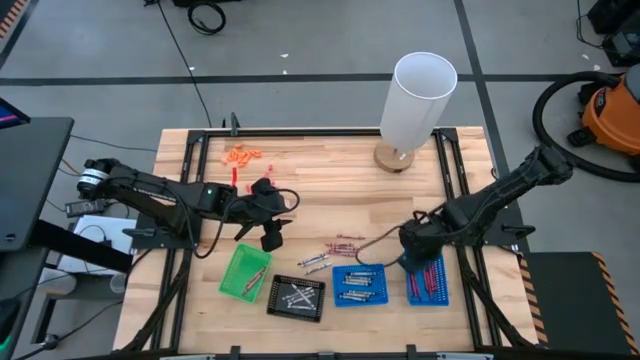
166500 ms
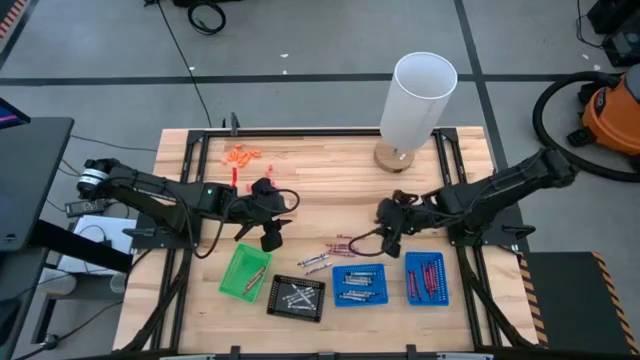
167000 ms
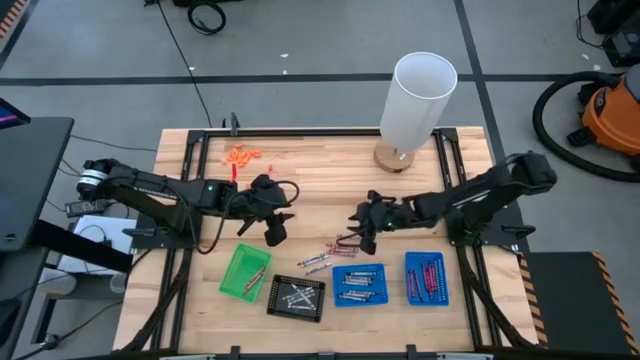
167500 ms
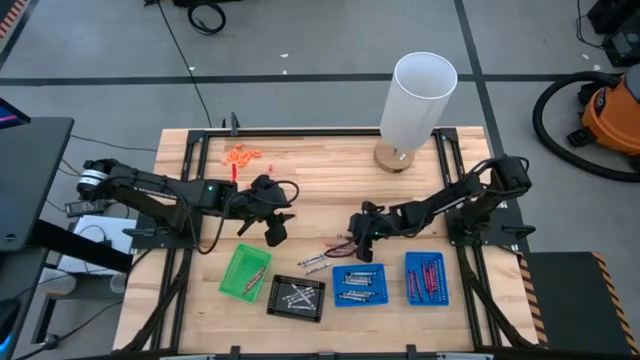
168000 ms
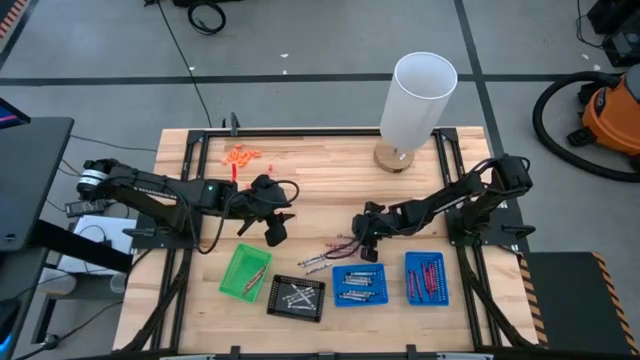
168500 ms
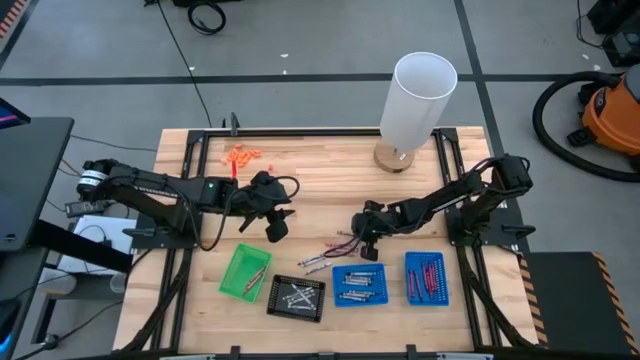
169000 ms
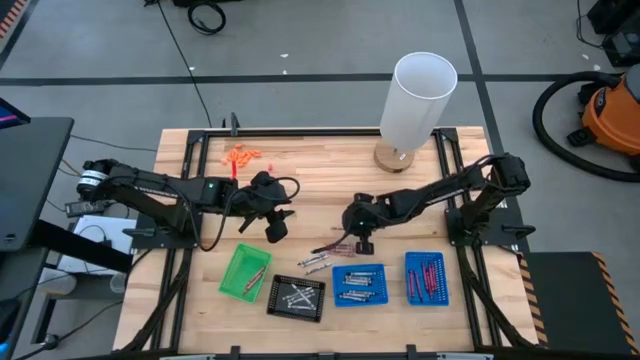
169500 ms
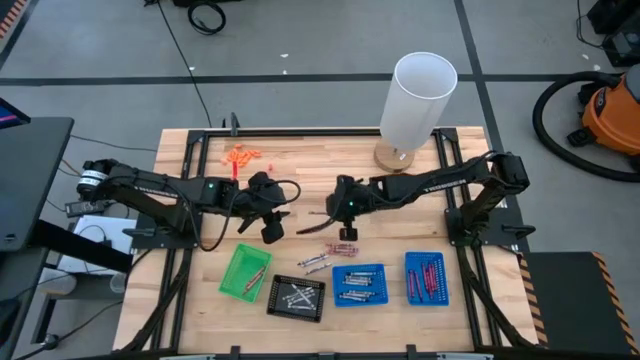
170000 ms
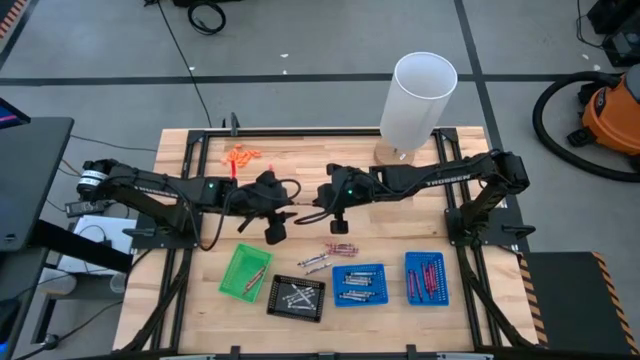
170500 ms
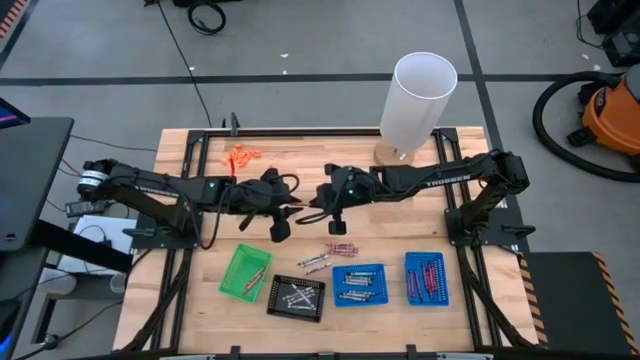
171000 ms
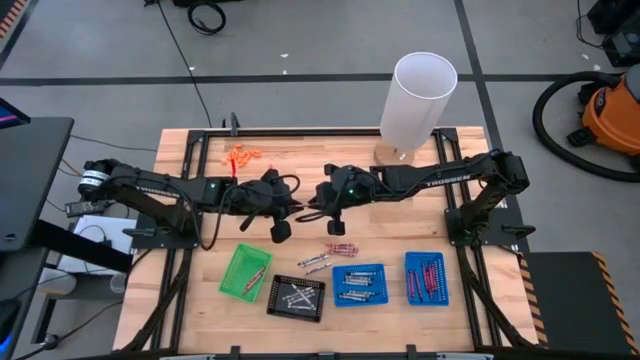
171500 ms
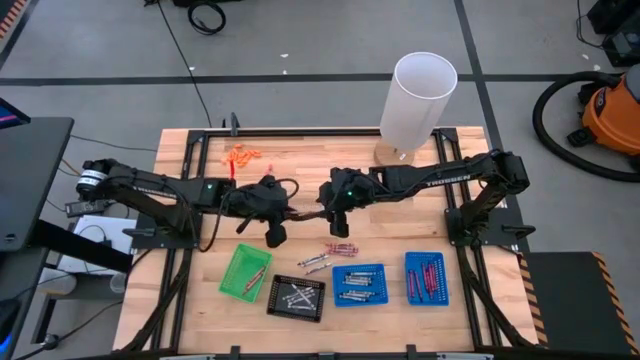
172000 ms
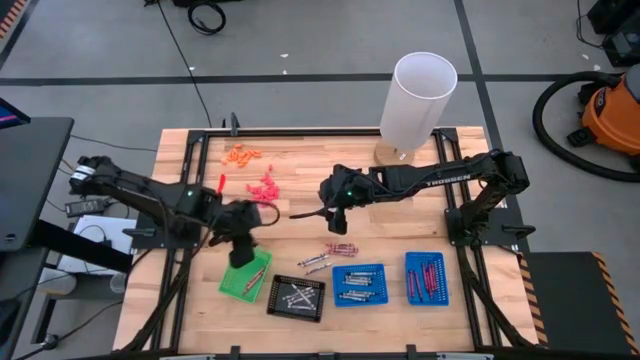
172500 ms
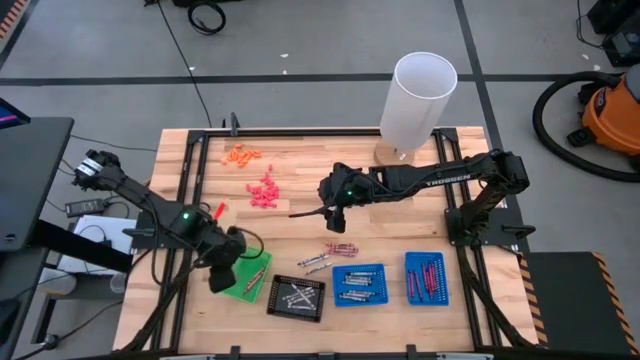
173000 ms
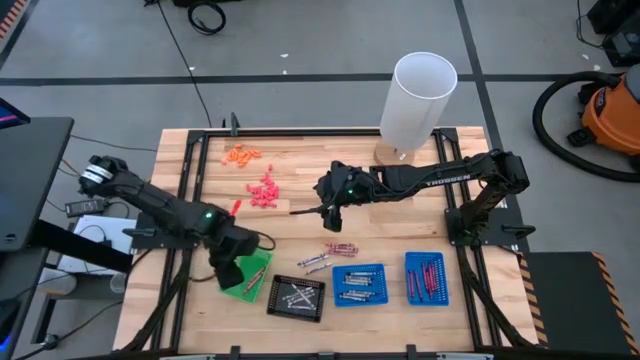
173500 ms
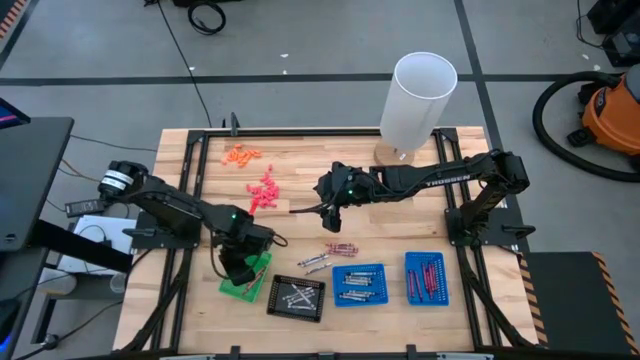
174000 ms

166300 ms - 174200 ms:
Task: Sort crayons
Put the pink crayon into the green basket

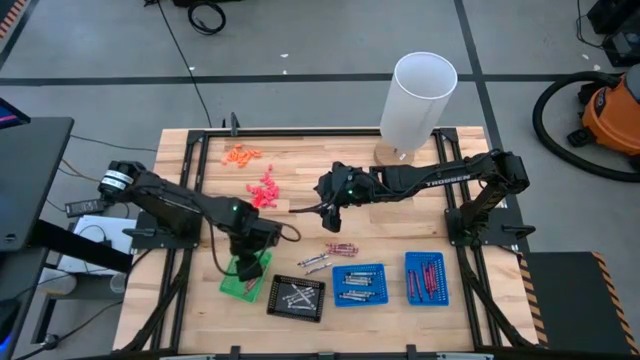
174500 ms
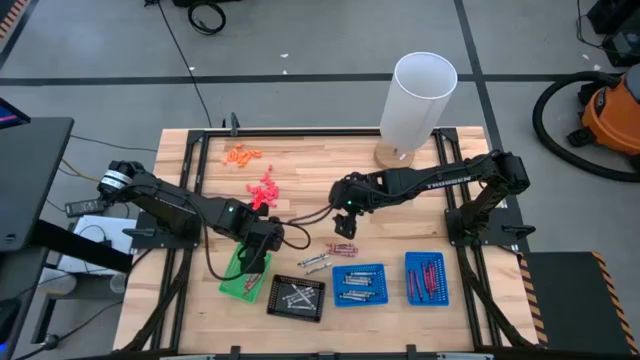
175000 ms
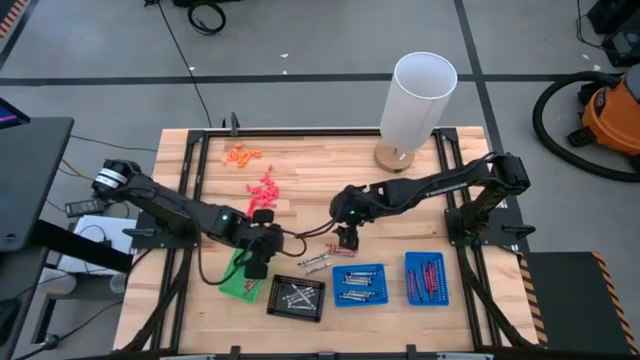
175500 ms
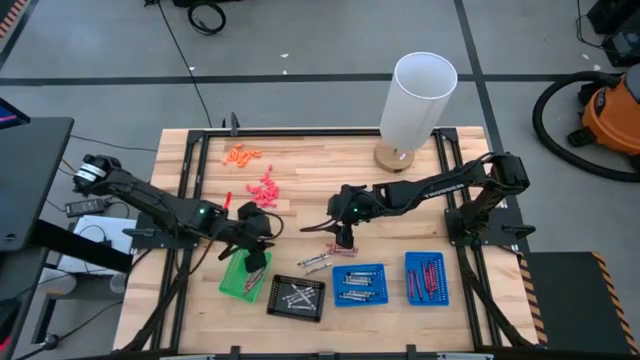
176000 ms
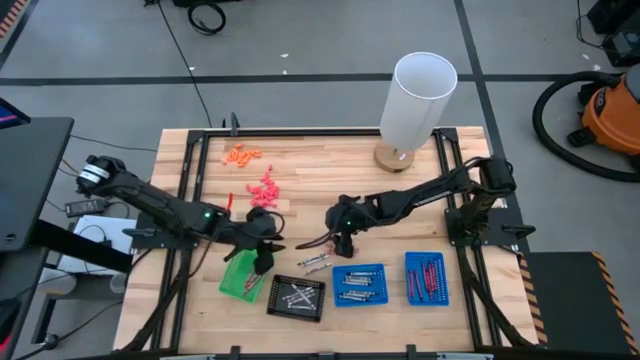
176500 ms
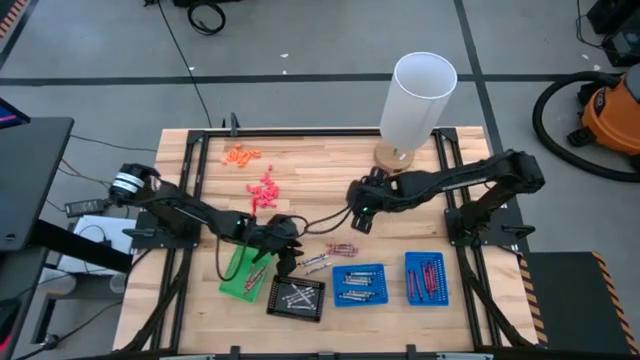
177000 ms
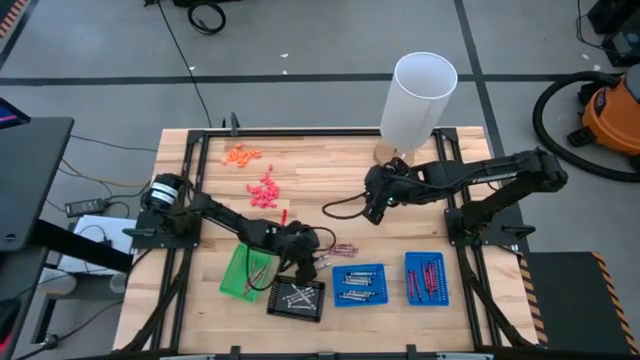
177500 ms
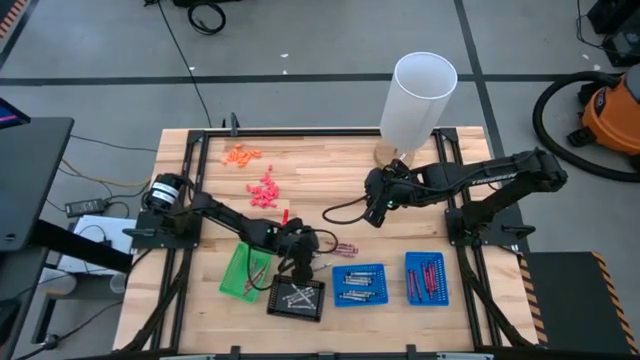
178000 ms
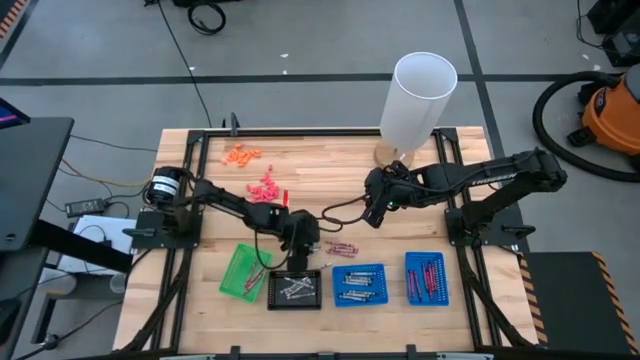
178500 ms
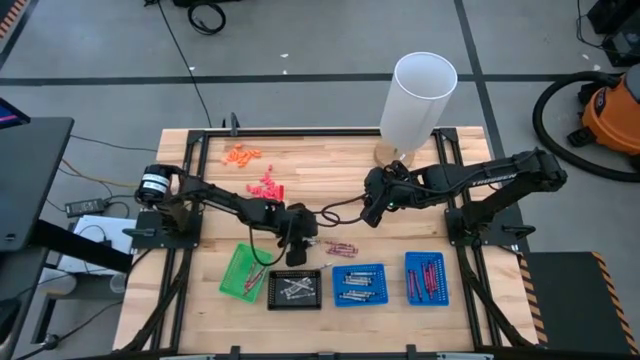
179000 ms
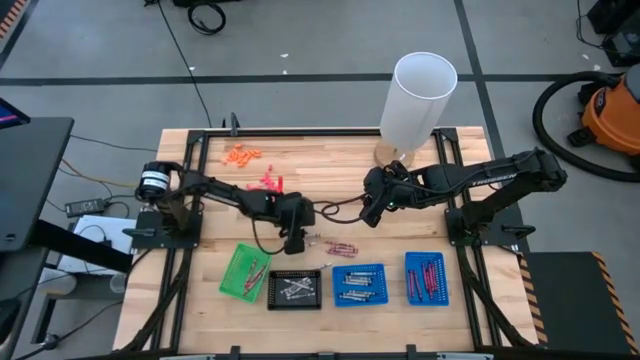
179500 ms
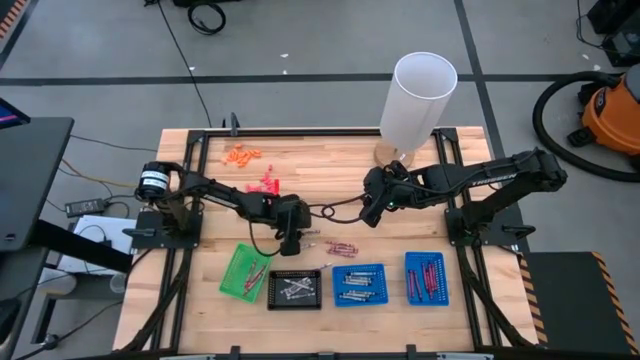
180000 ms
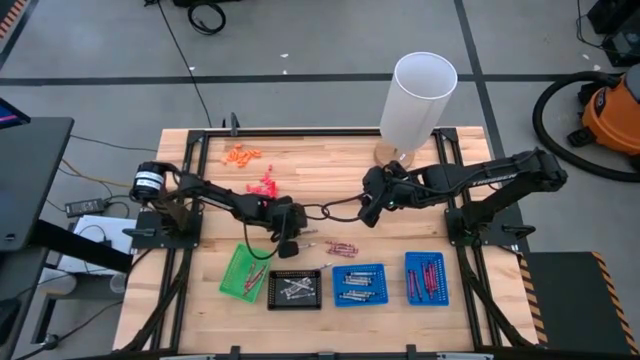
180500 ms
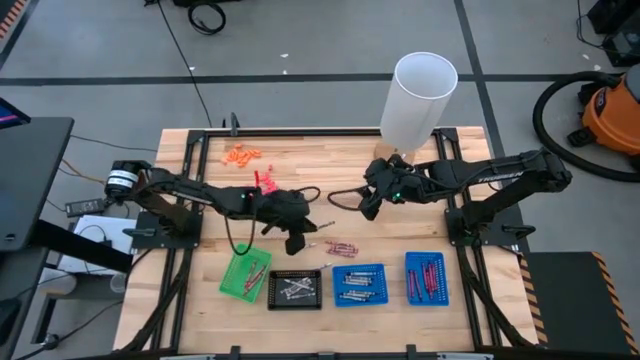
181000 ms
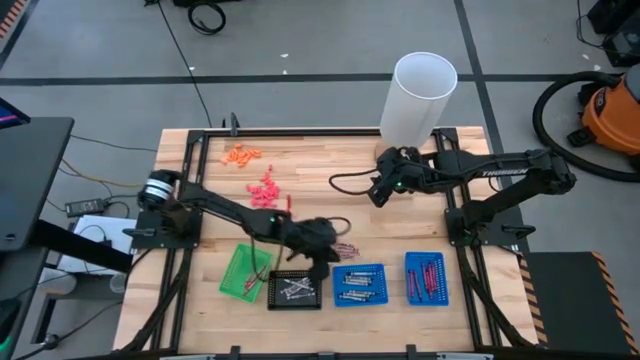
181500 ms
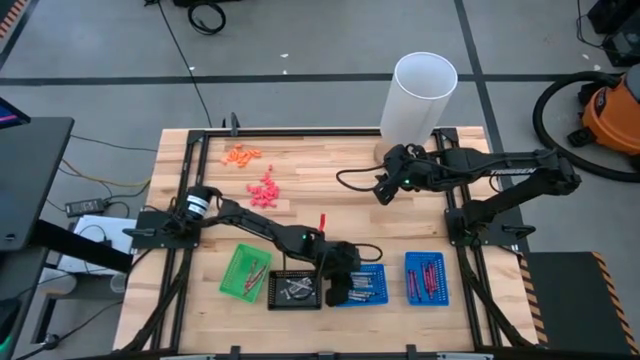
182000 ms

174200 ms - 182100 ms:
Put the black crayon into the left blue basket

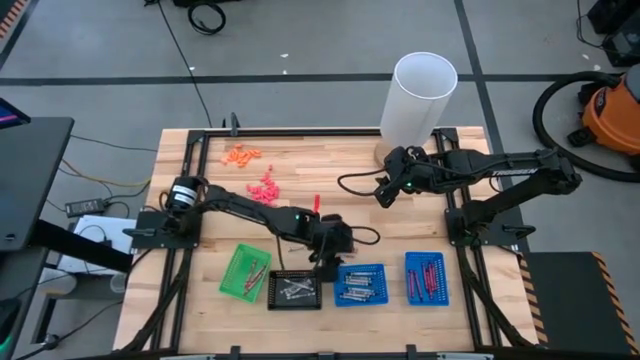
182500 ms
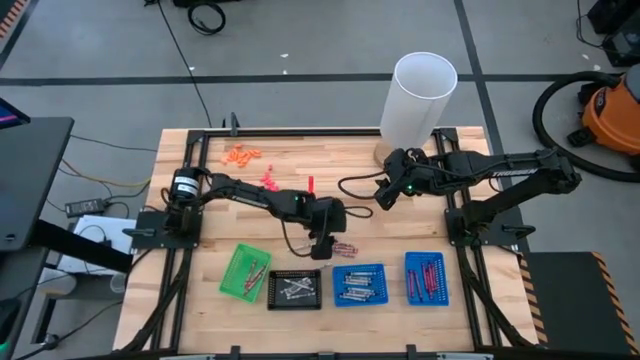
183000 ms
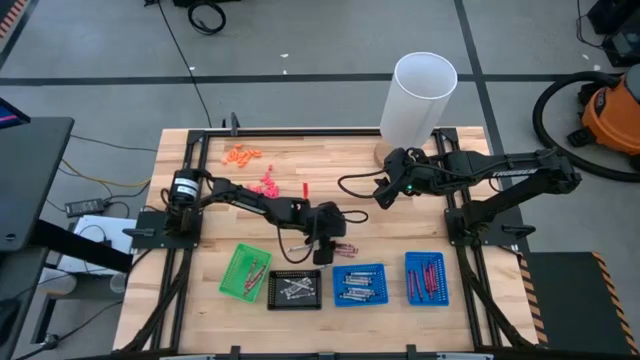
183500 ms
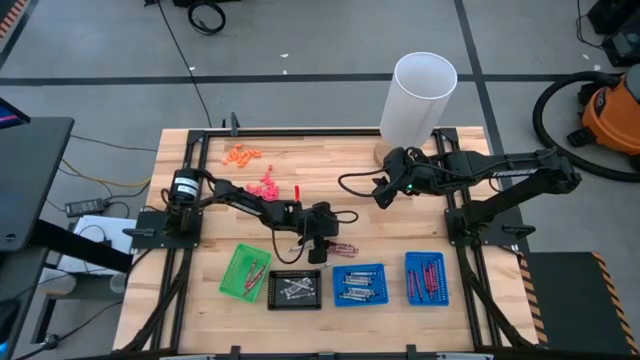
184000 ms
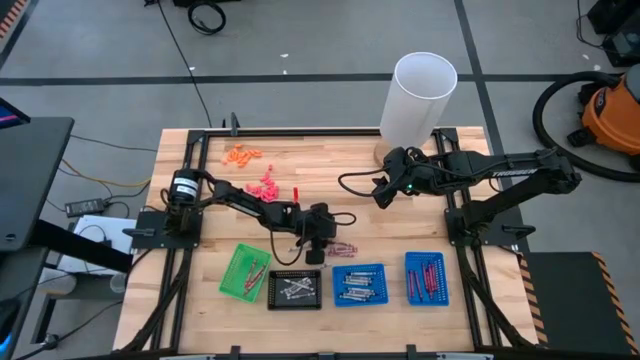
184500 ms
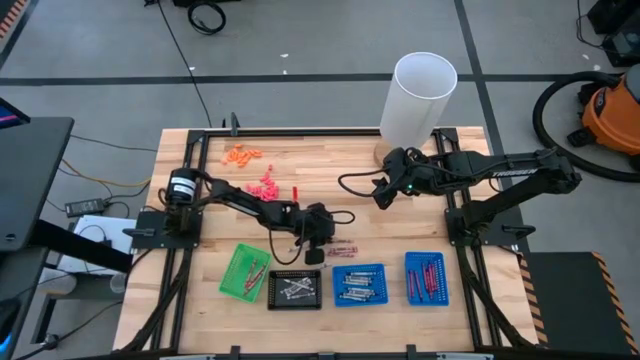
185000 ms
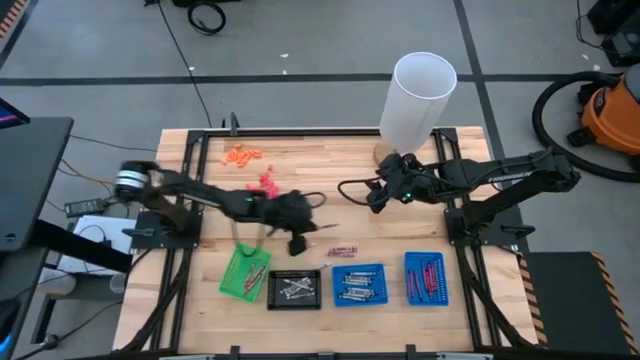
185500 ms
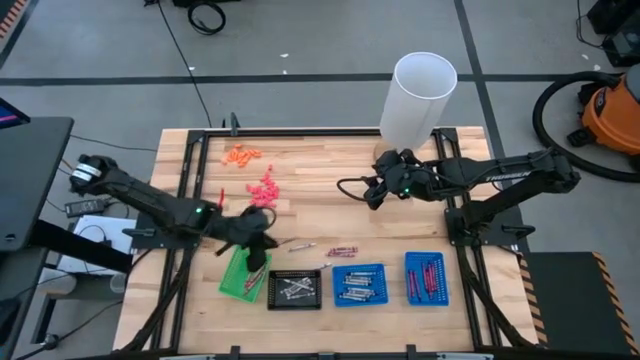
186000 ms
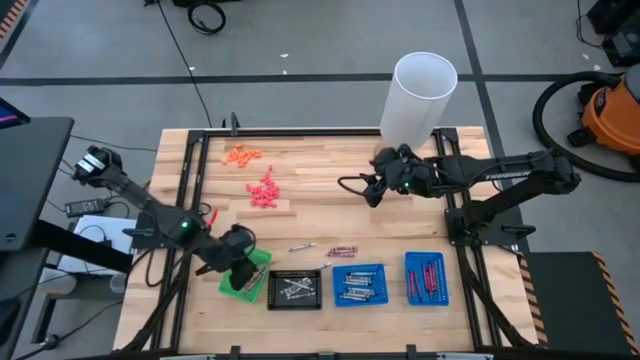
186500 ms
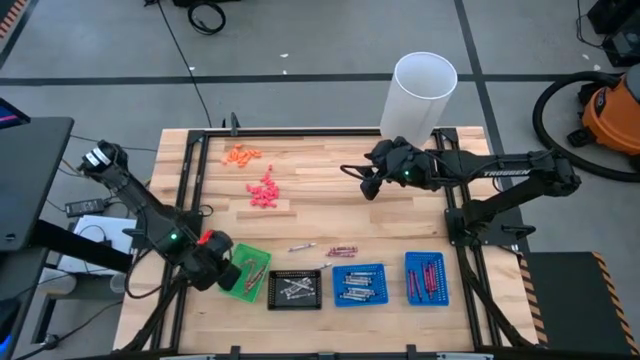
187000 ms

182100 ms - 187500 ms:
Put the pink crayon into the green basket
